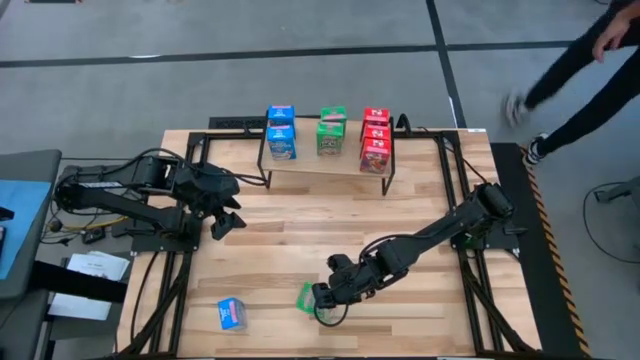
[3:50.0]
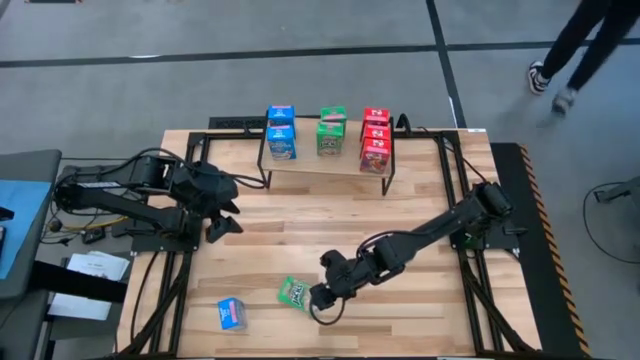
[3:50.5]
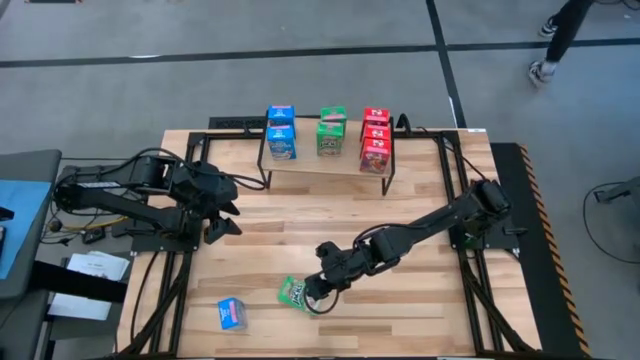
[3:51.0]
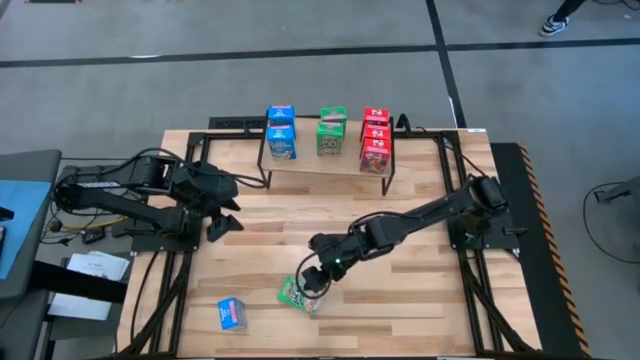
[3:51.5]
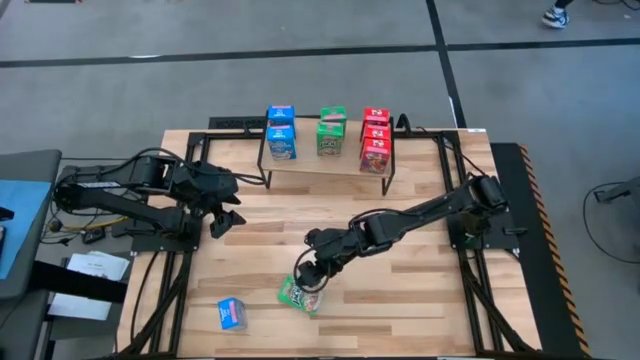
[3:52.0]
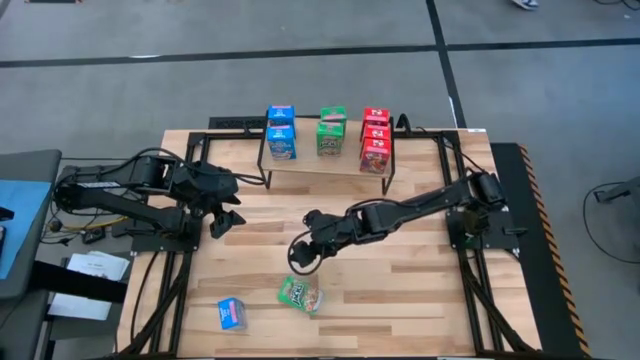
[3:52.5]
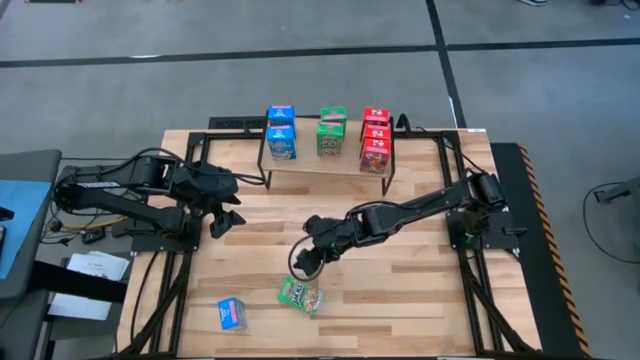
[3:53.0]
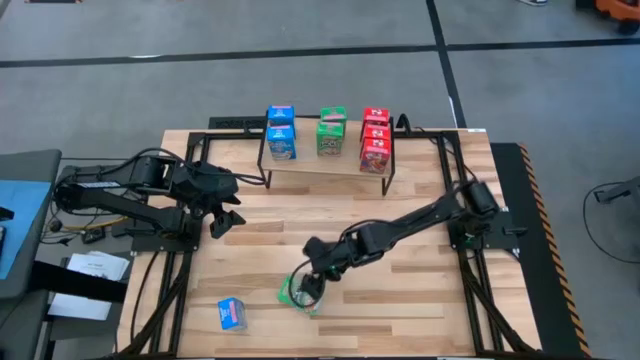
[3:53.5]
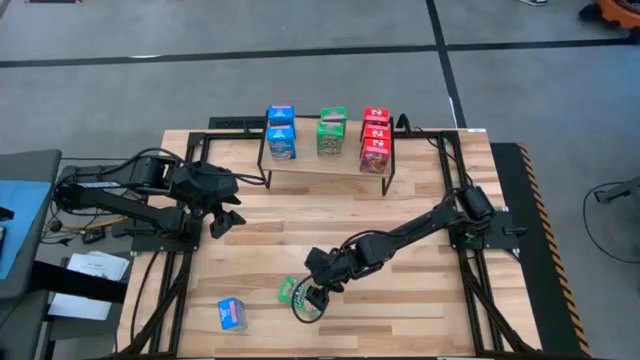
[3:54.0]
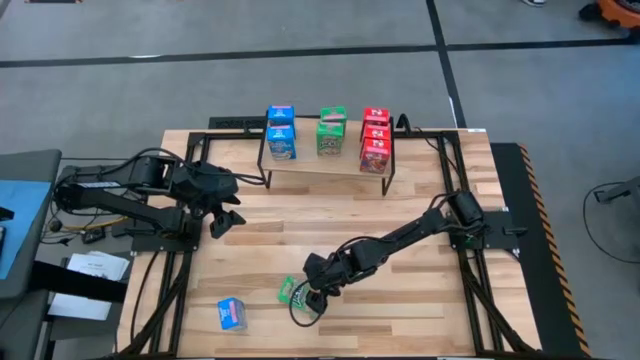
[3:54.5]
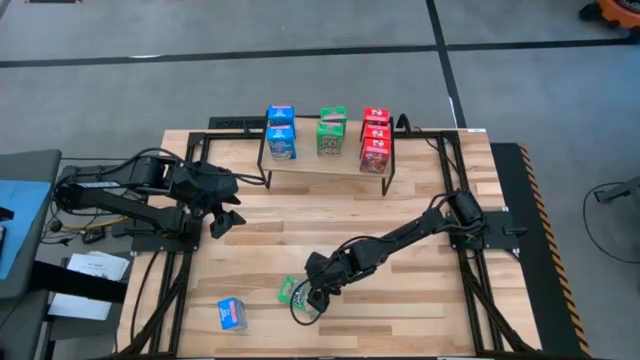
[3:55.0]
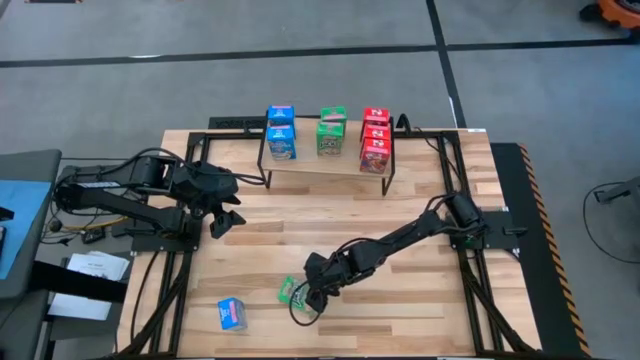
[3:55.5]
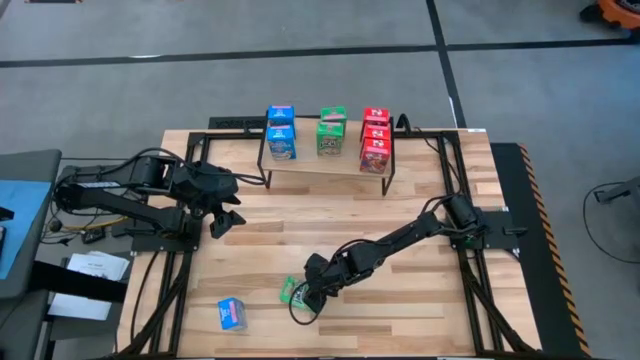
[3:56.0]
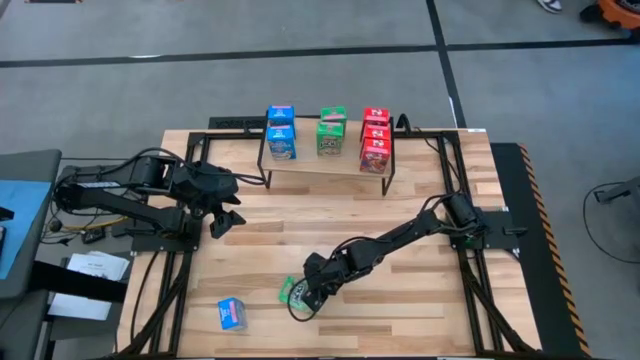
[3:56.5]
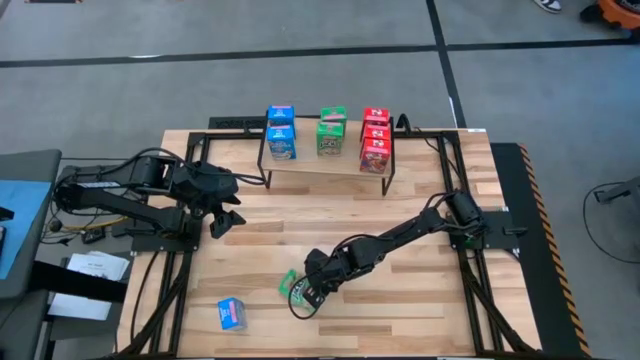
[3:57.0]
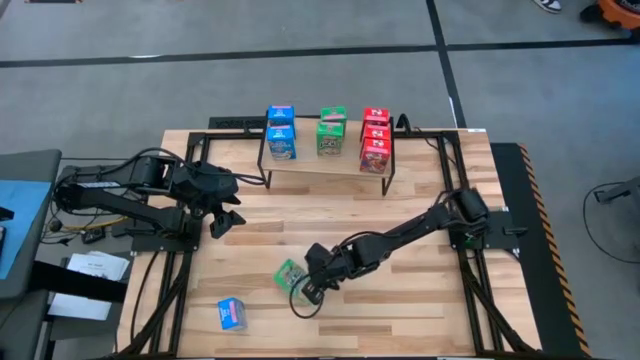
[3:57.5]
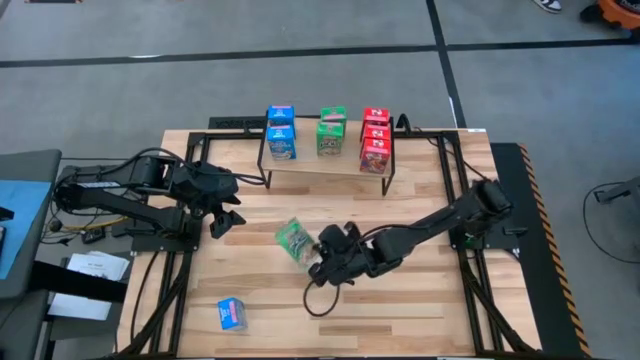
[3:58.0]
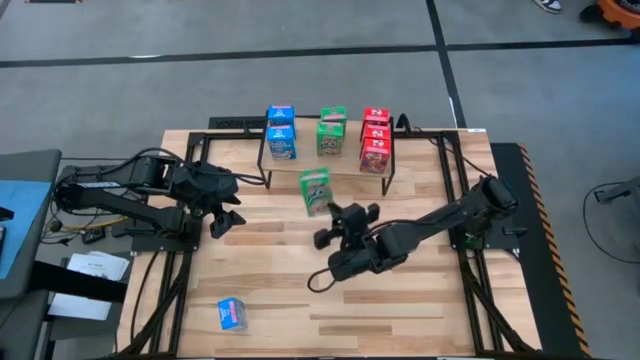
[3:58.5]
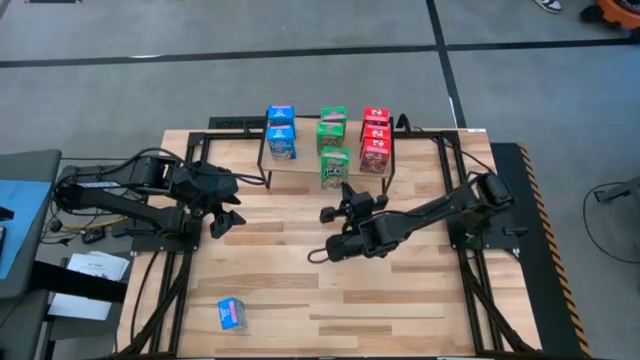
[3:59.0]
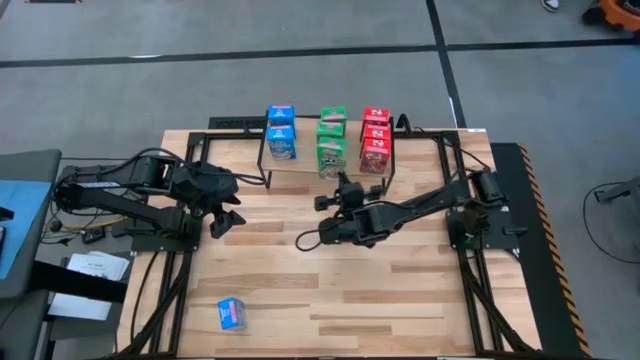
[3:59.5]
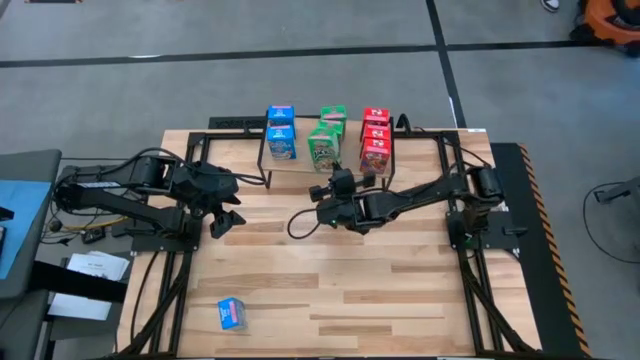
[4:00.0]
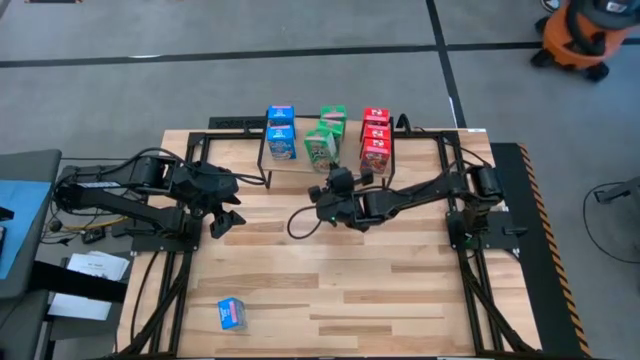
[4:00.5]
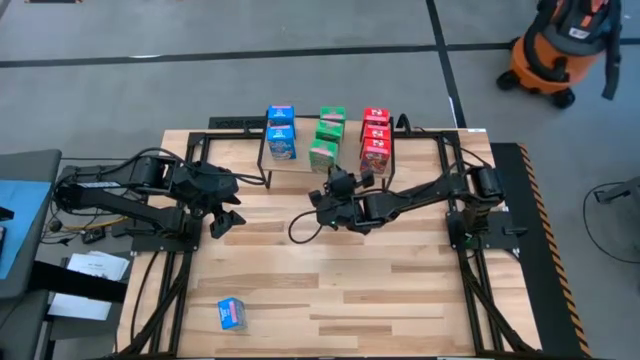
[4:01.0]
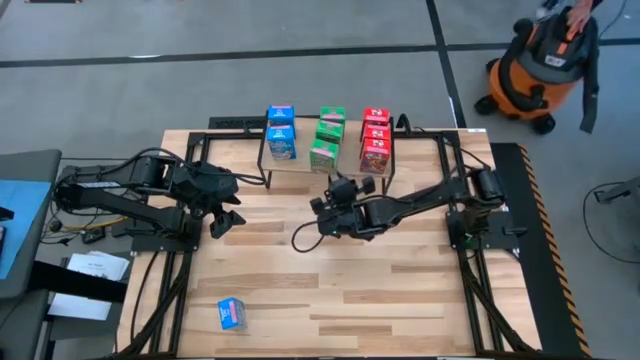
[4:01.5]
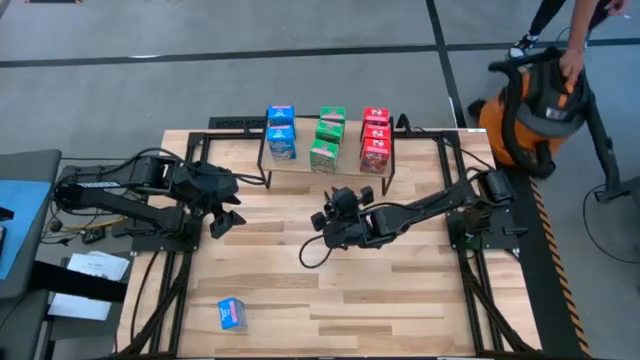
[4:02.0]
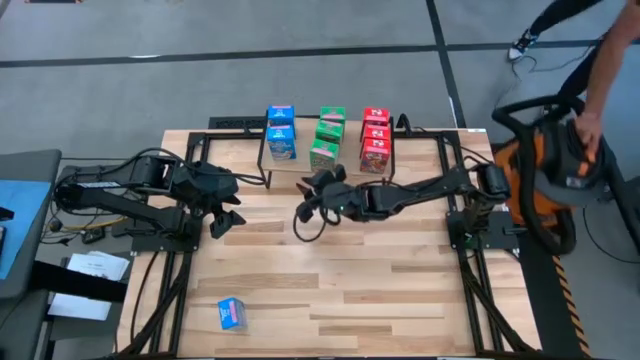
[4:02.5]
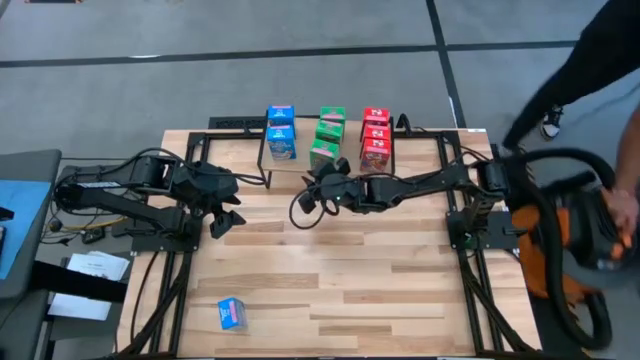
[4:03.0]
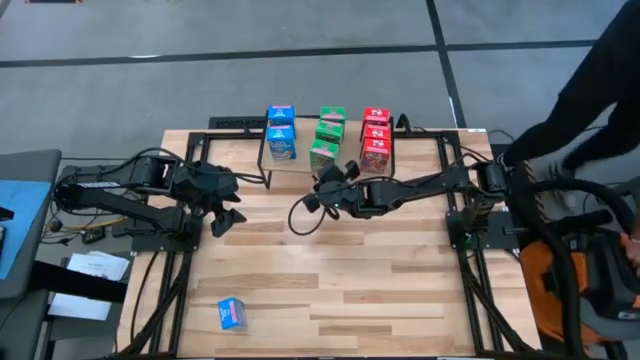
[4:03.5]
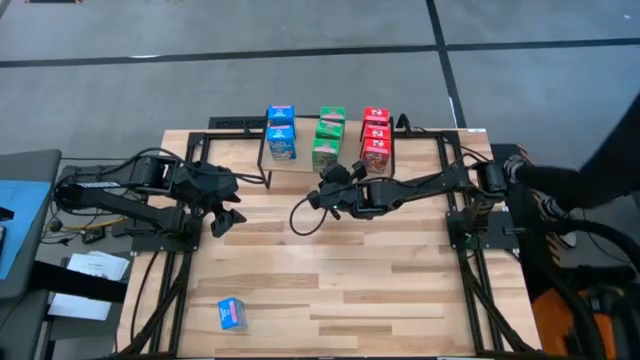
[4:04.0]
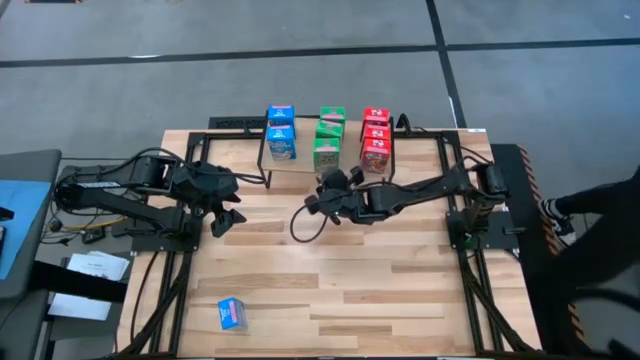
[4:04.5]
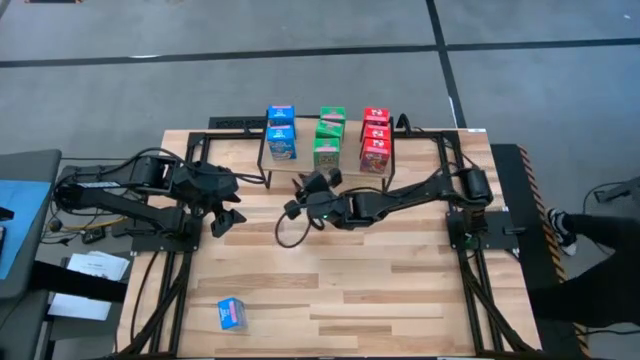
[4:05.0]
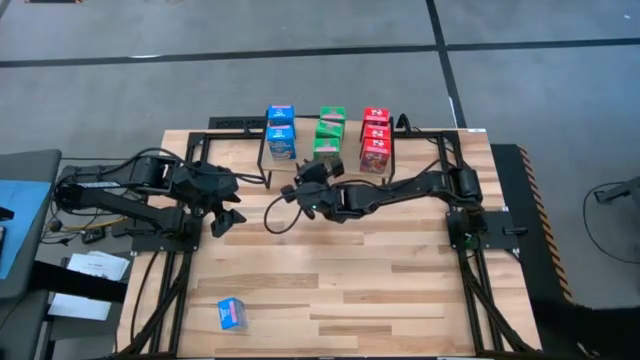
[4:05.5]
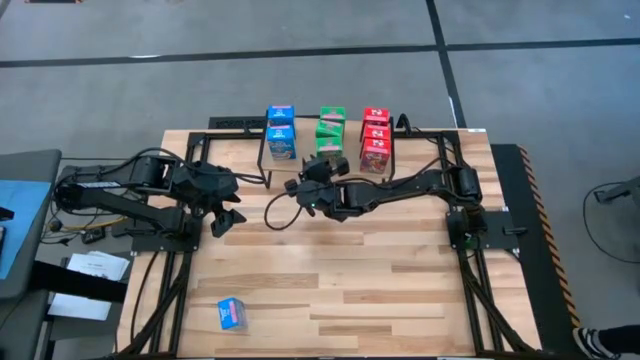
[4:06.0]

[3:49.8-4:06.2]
Task: Stack cereal on shelf
Put the green cereal box on the shelf aligned with the other green cereal boxes

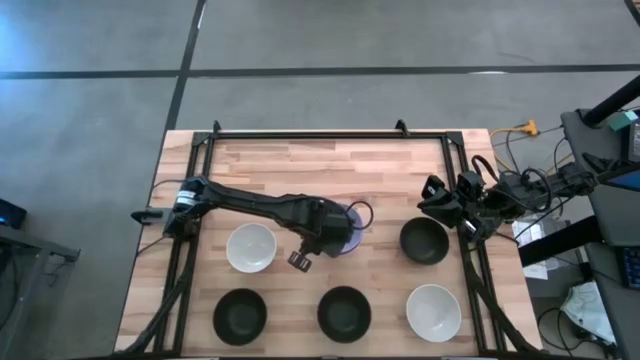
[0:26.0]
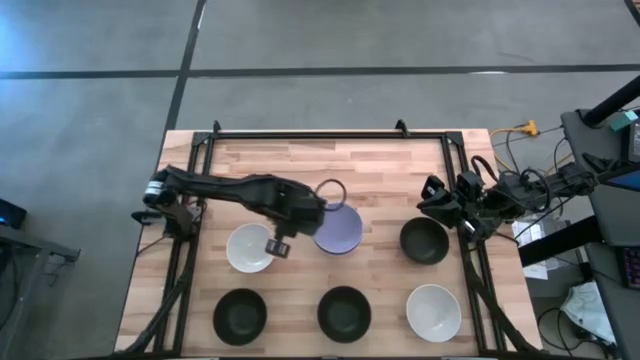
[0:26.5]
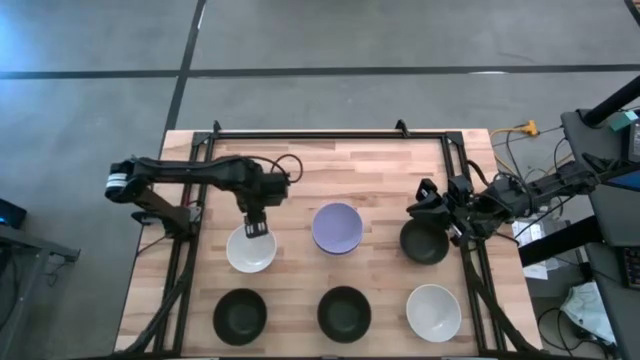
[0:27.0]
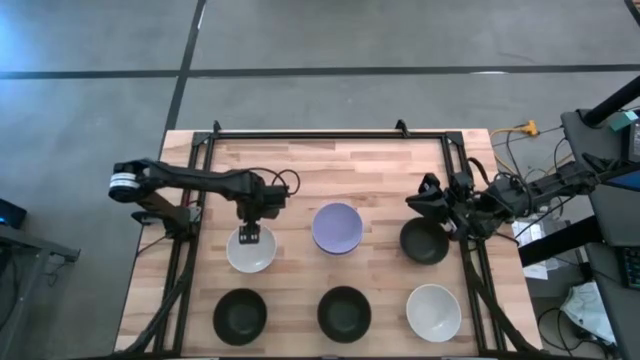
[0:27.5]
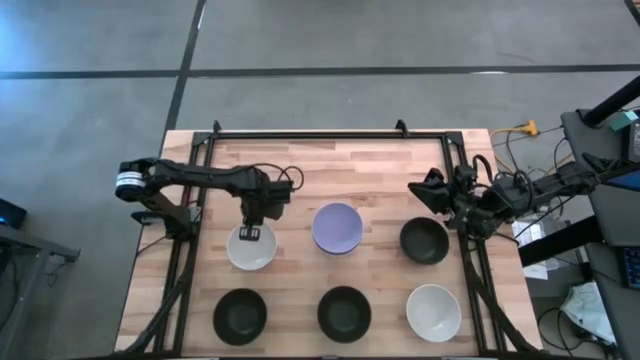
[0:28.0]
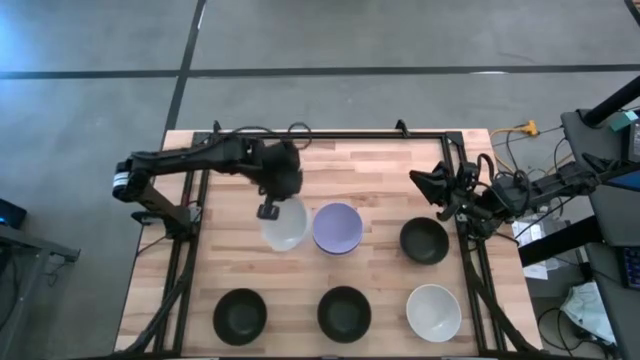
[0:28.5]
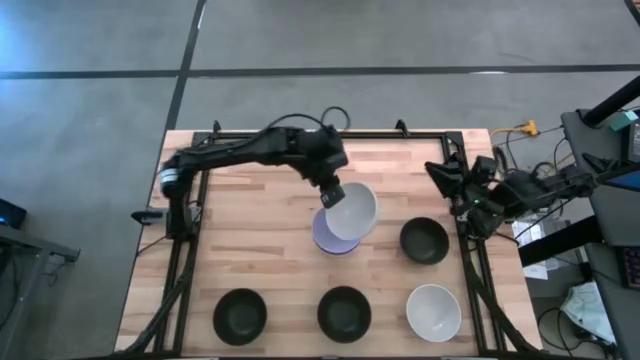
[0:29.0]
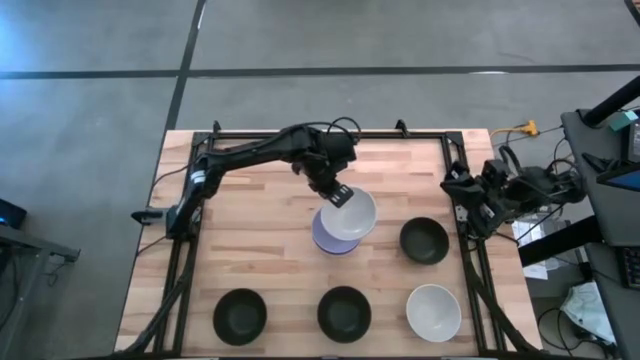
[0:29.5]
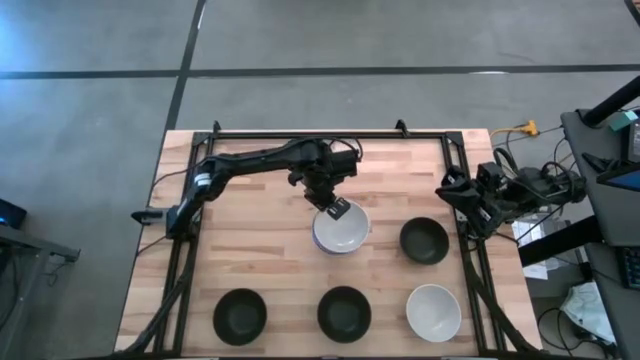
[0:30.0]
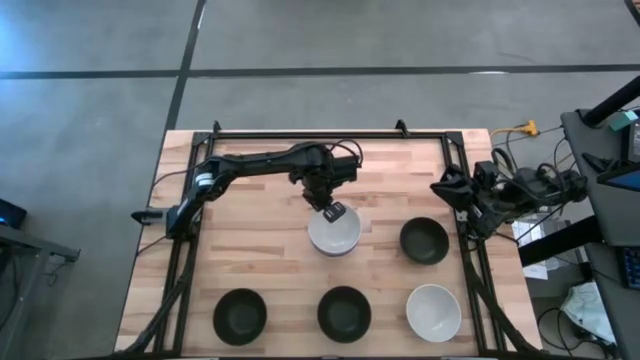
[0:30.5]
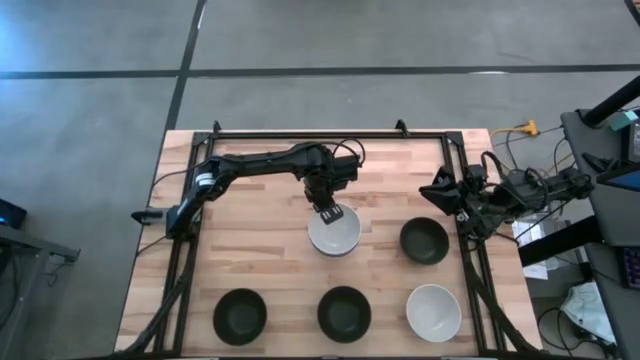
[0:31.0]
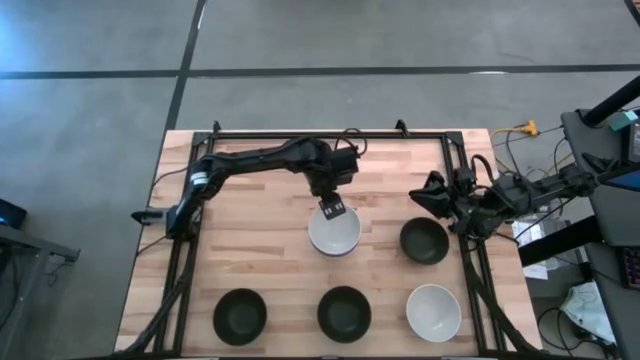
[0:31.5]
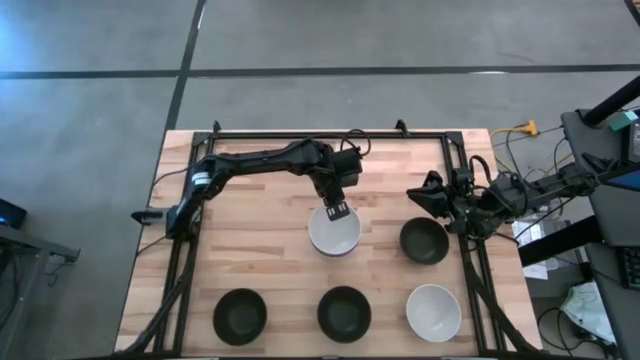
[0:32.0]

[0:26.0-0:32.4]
Task: Nest bowls inside each other
Stack the white bowl on the violet bowl
